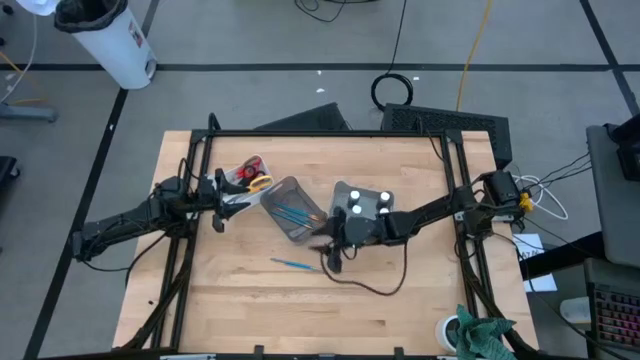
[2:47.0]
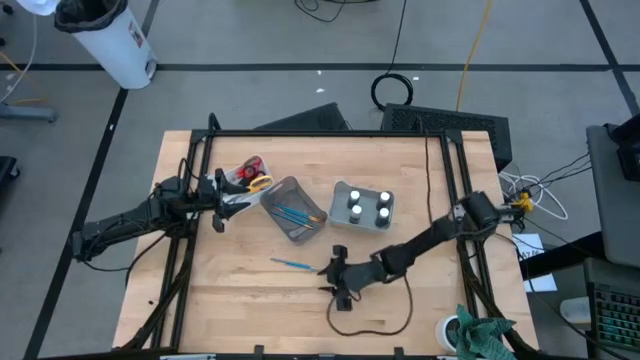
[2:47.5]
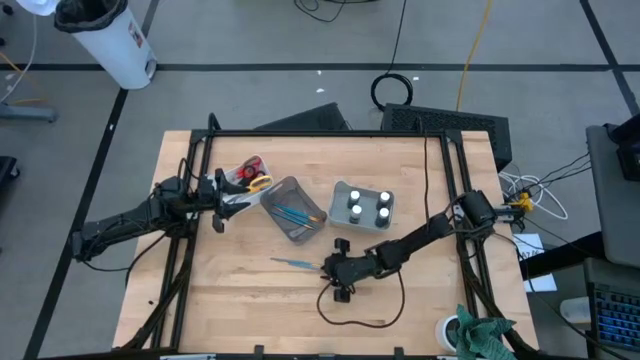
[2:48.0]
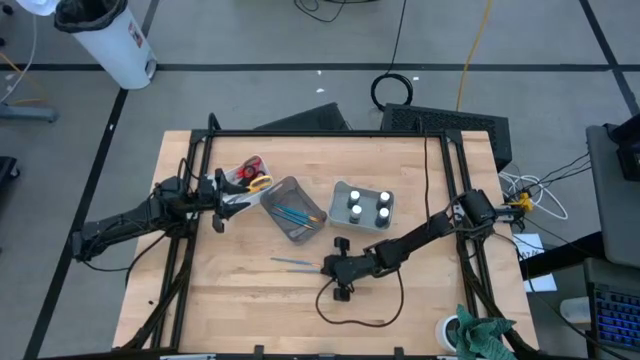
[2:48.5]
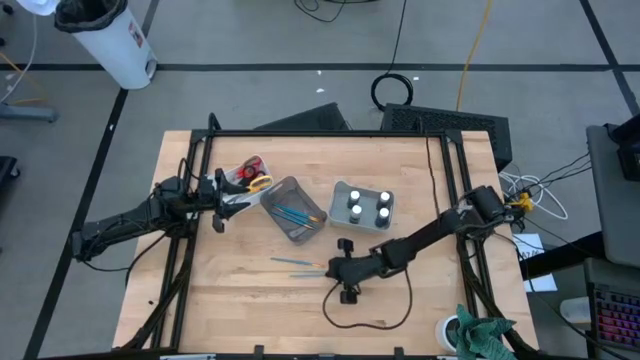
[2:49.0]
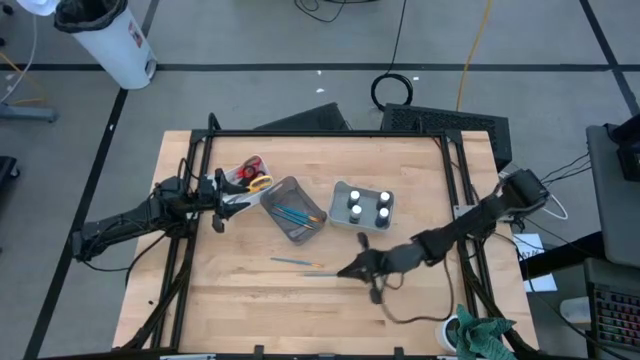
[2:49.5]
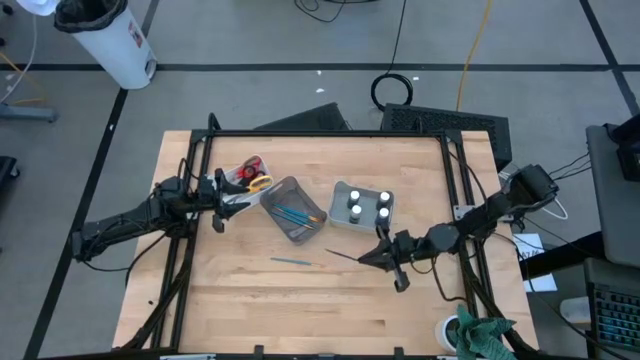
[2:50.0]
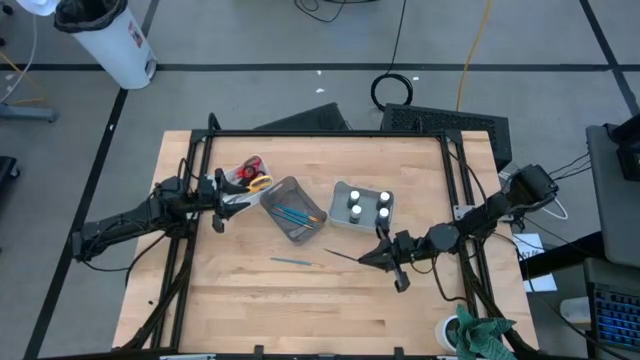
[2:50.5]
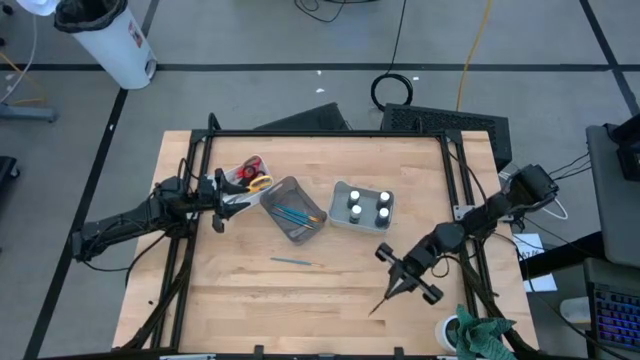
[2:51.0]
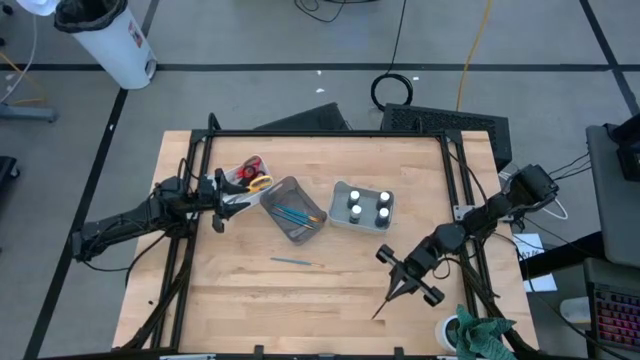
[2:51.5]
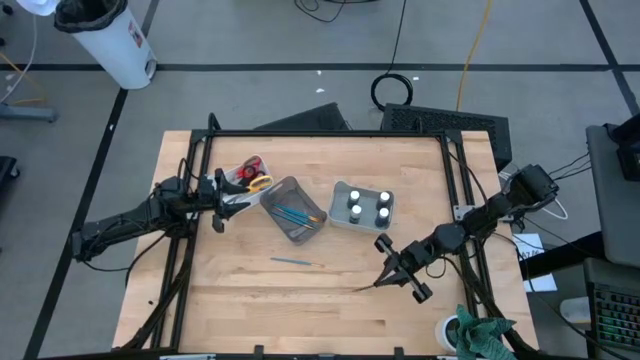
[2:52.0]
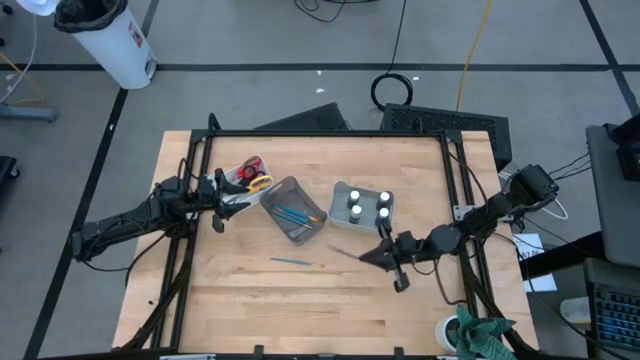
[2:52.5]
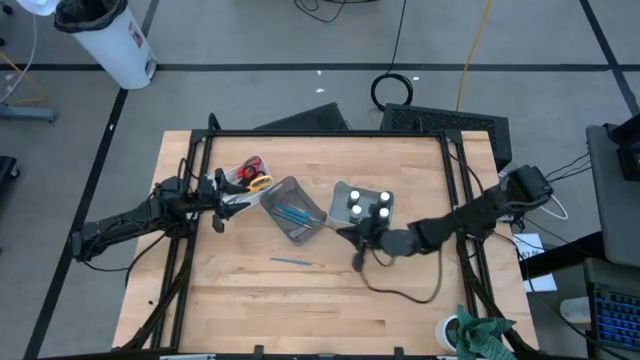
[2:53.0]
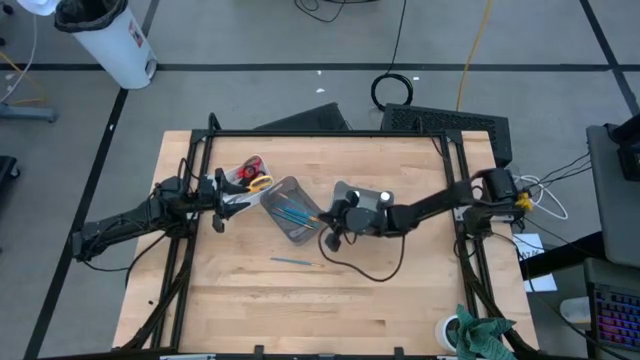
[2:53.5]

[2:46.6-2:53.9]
Task: Pick & Place Paint Supplies
Put the blue paintbrush into the black bin

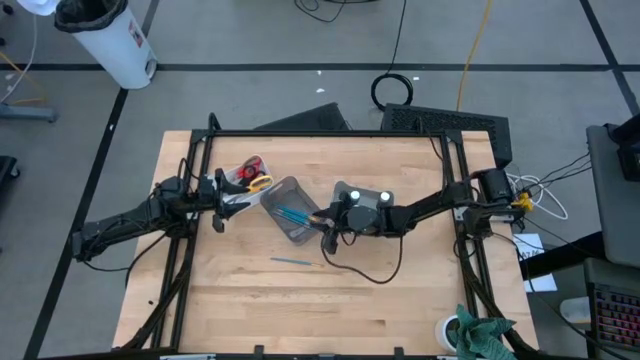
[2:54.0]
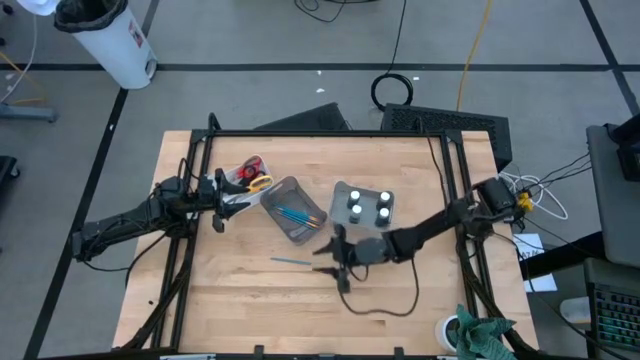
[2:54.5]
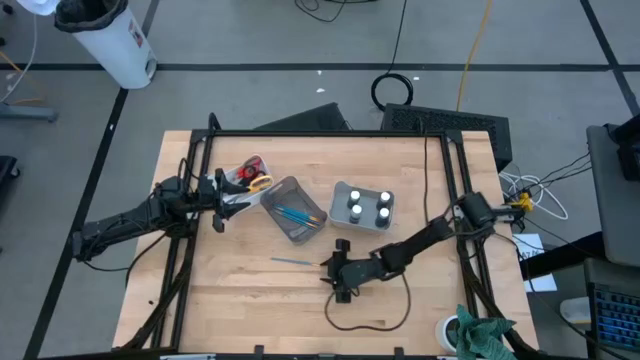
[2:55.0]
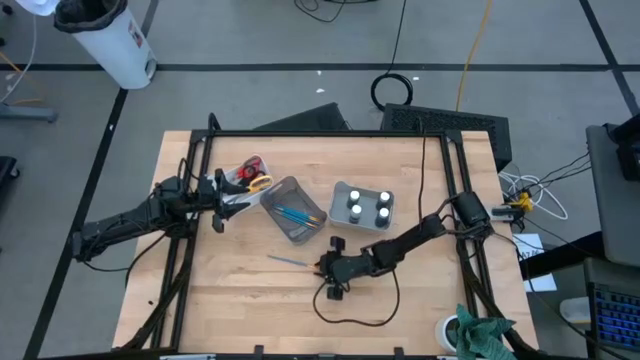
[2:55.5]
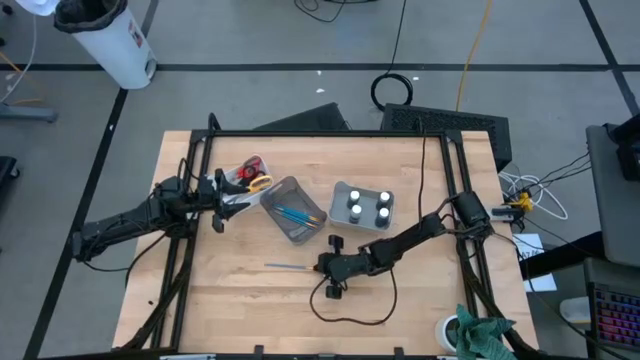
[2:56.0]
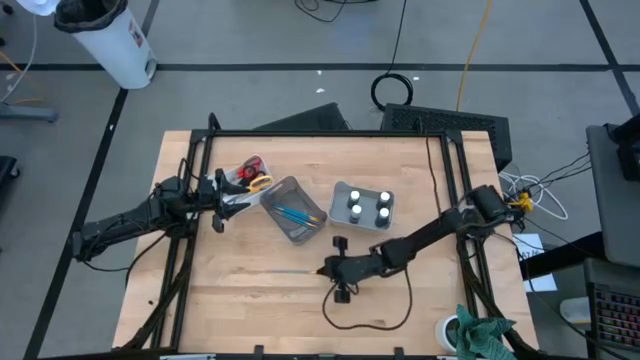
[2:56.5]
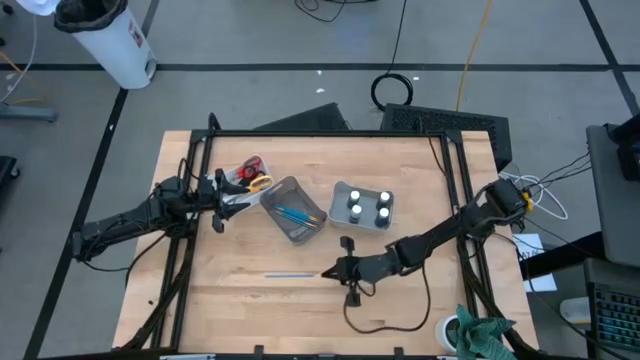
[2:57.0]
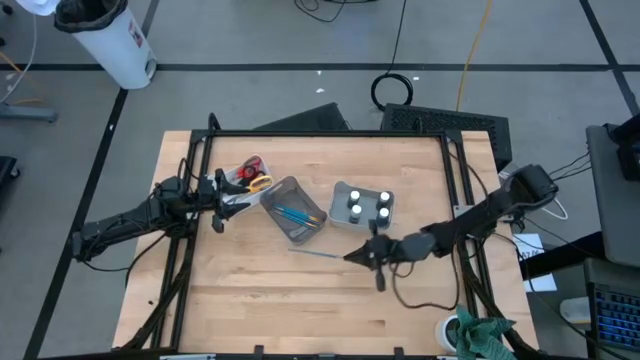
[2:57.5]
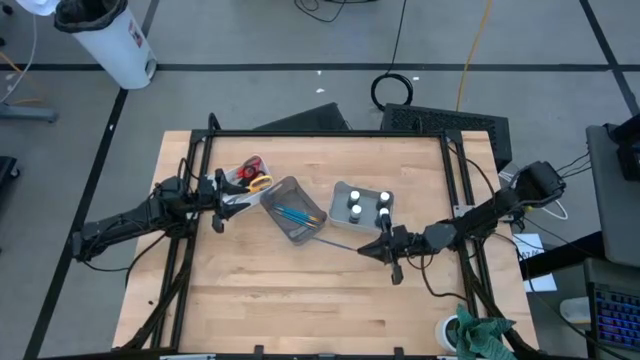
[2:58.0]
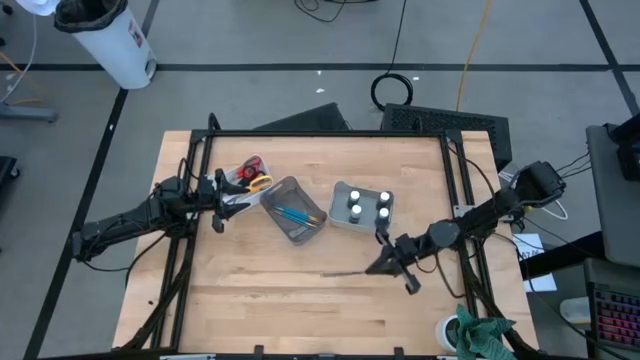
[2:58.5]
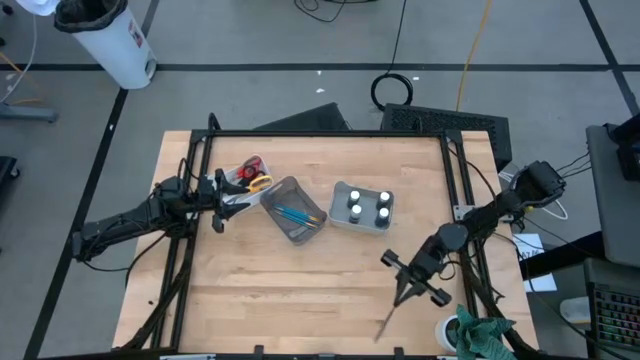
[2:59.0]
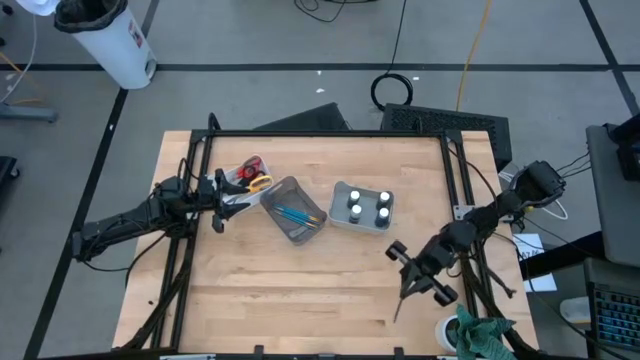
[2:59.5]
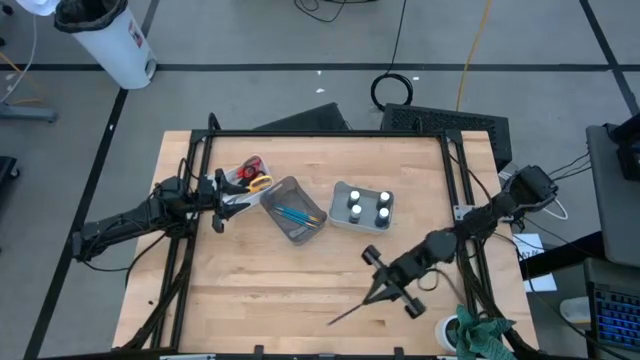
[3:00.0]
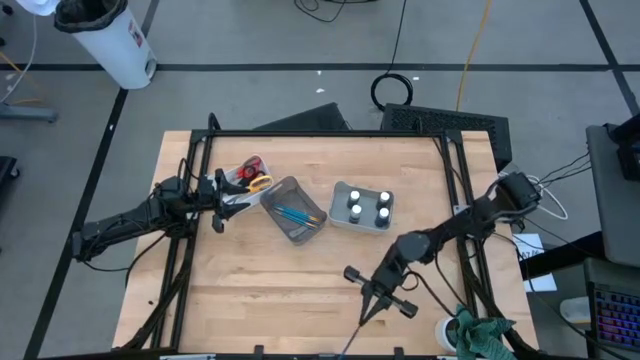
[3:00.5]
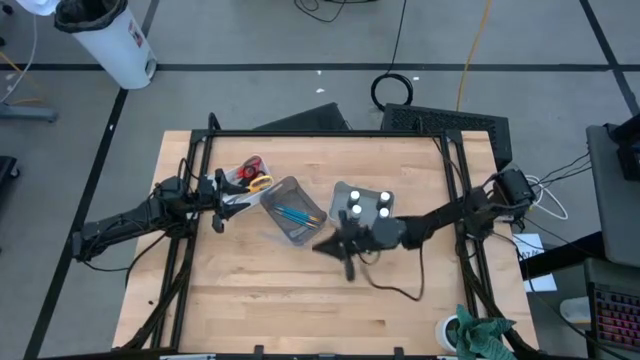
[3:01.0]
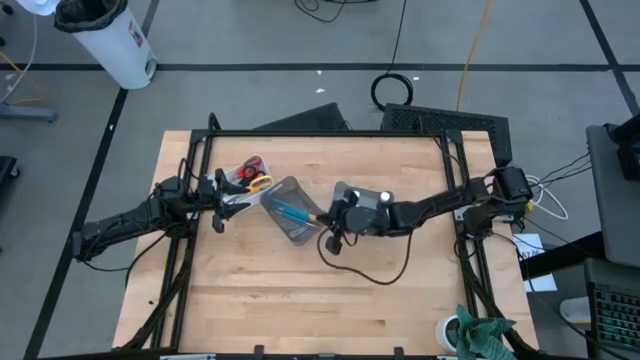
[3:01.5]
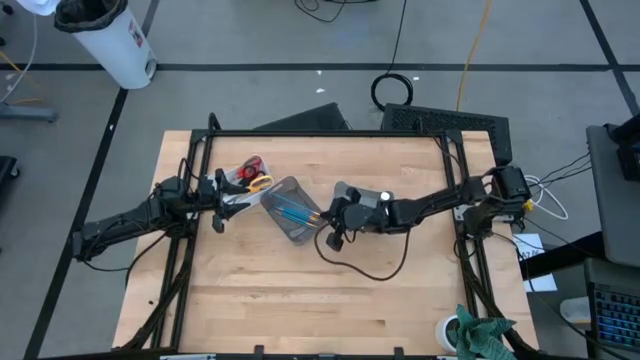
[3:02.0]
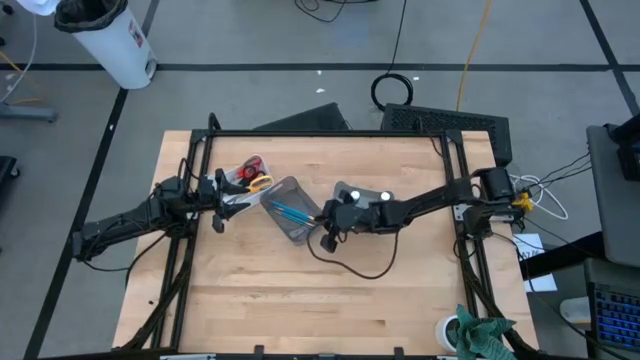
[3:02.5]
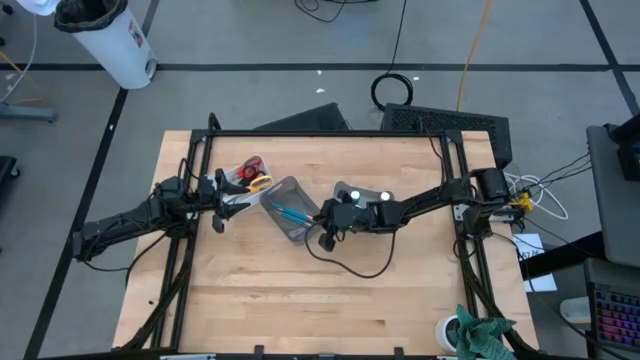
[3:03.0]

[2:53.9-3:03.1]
Put the blue paintbrush into the black bin

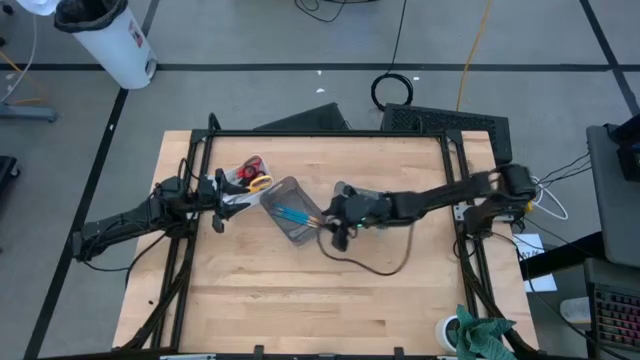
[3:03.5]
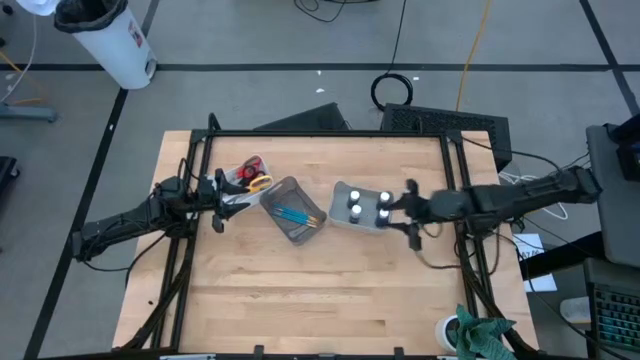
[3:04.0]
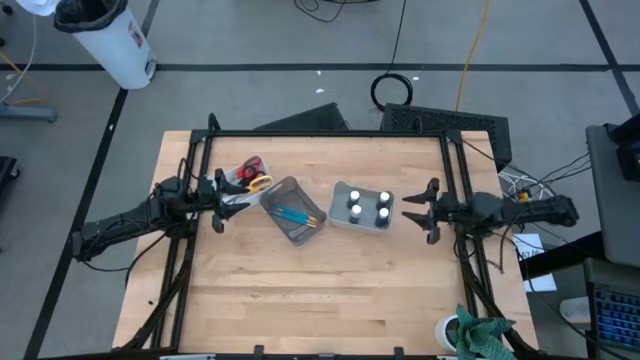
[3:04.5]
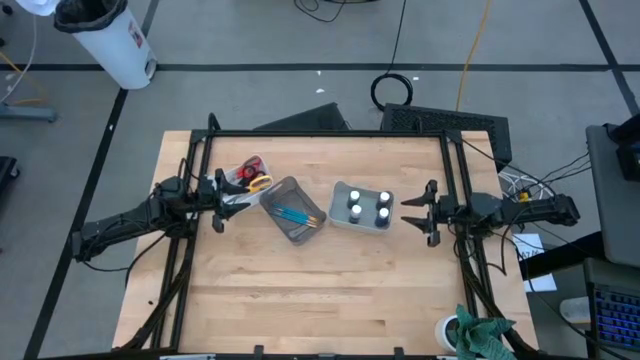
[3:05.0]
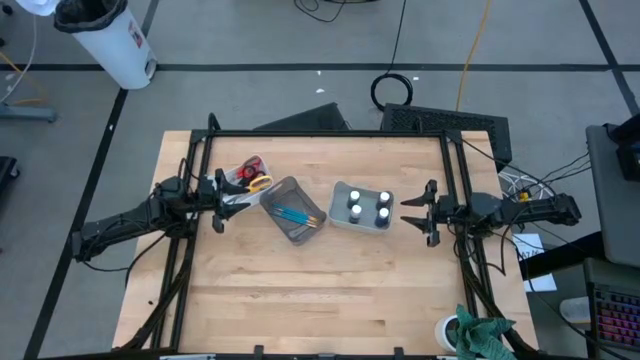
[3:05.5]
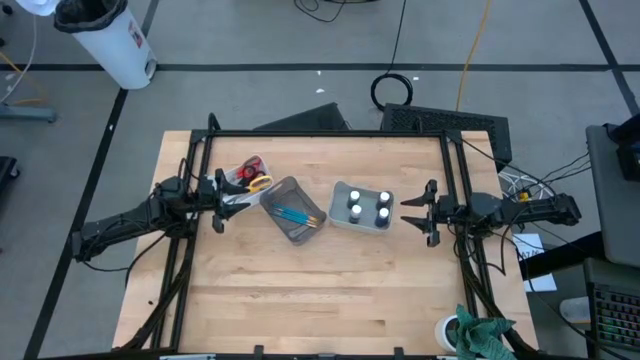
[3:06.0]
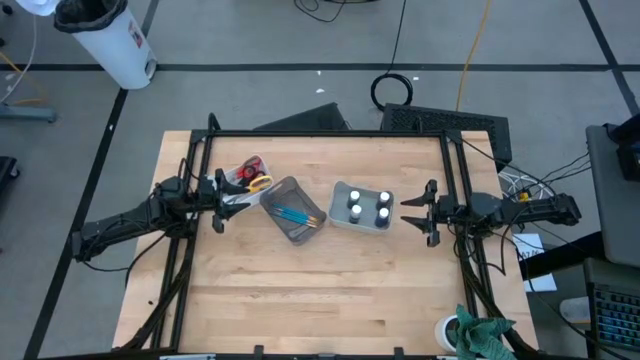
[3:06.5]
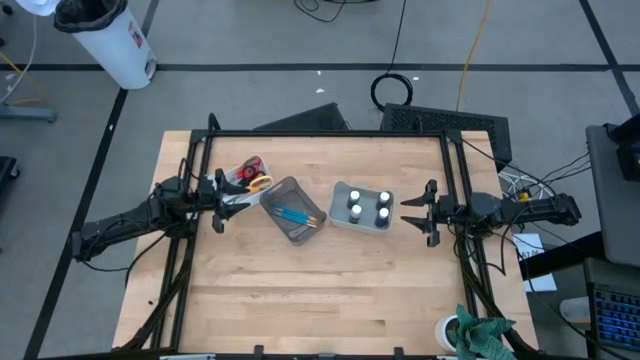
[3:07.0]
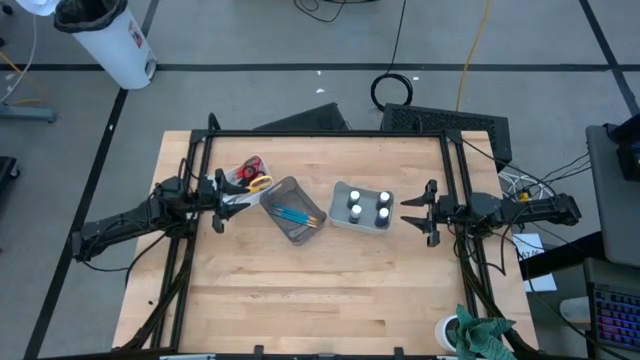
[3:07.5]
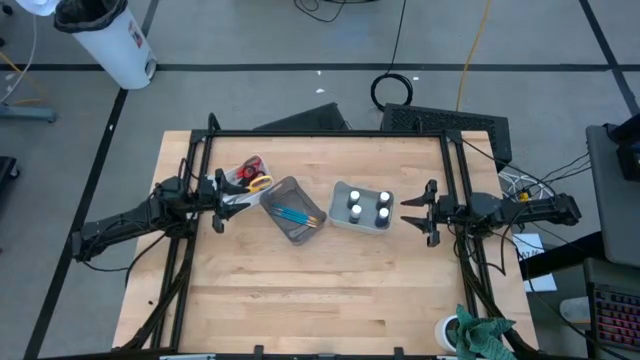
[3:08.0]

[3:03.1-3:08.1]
Return to Home Position
